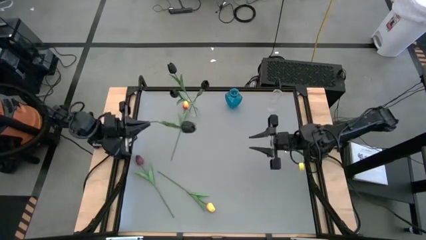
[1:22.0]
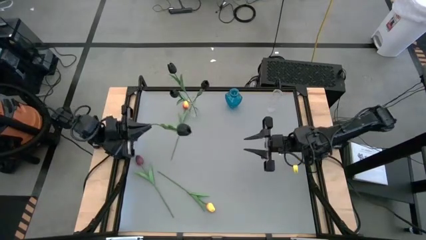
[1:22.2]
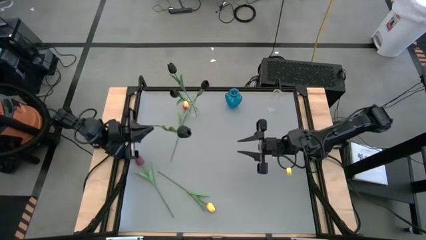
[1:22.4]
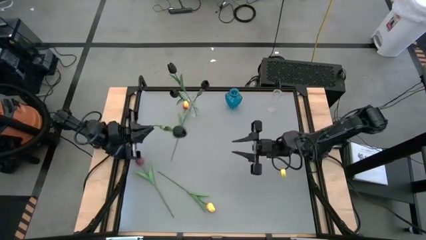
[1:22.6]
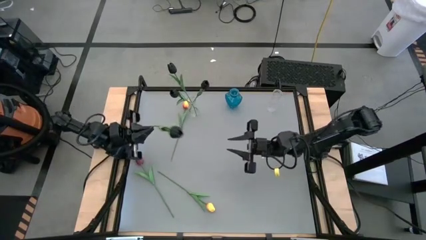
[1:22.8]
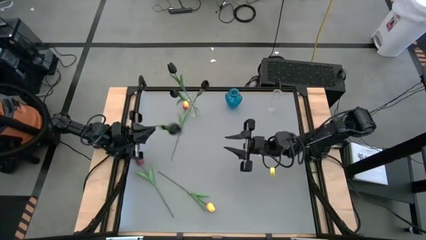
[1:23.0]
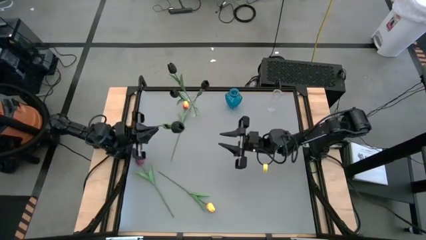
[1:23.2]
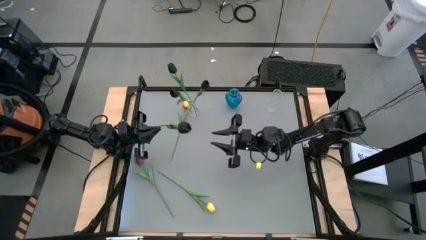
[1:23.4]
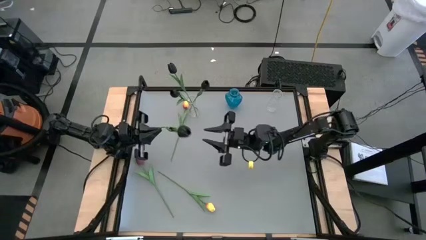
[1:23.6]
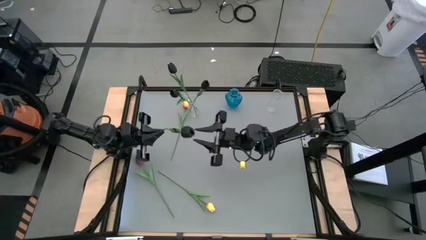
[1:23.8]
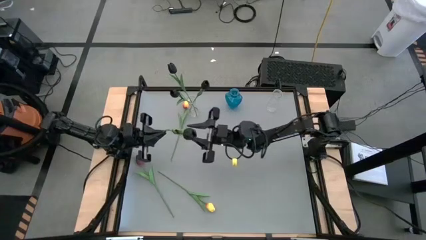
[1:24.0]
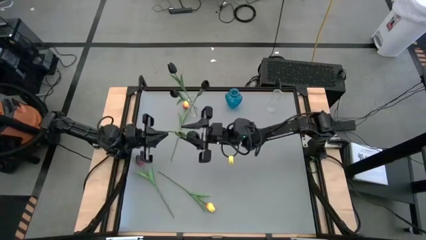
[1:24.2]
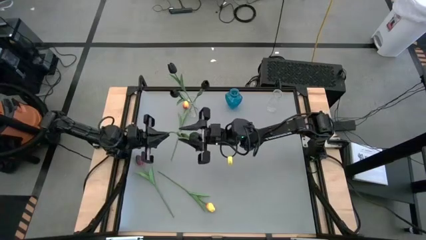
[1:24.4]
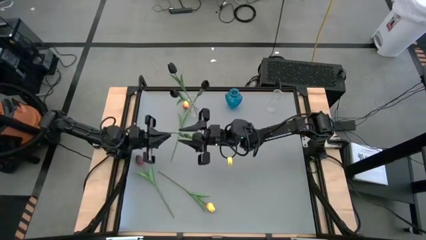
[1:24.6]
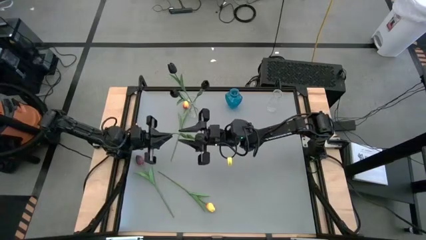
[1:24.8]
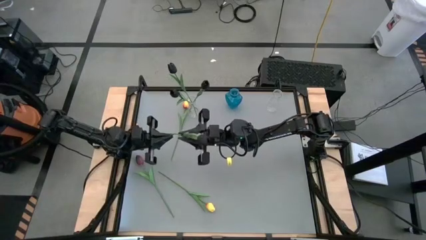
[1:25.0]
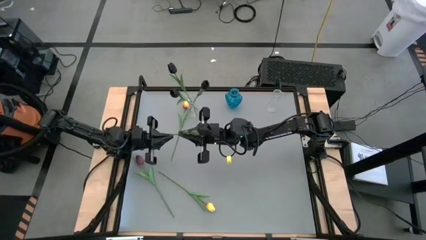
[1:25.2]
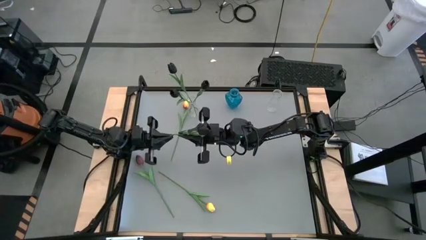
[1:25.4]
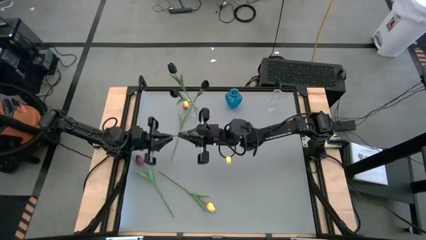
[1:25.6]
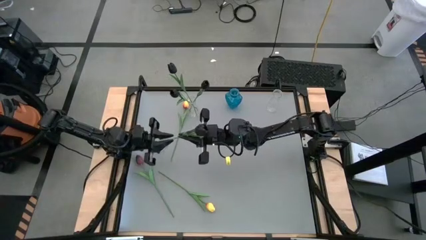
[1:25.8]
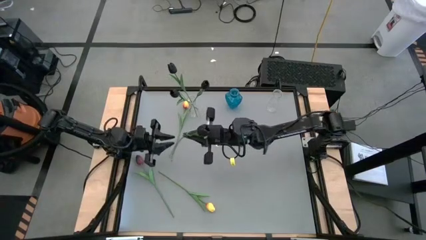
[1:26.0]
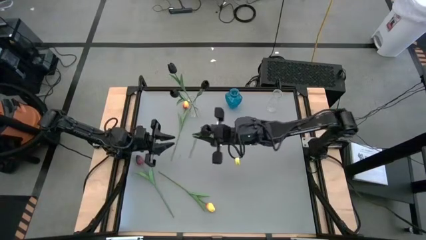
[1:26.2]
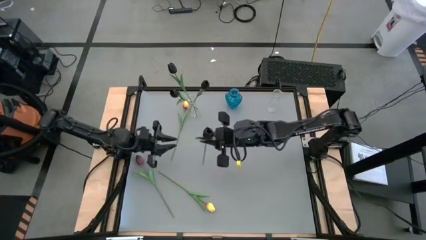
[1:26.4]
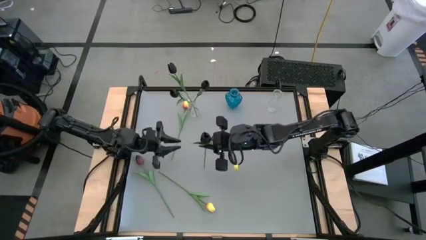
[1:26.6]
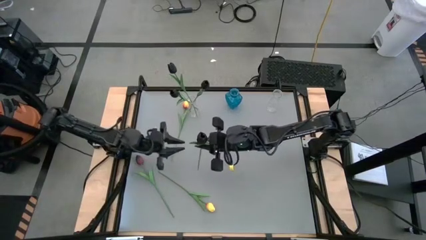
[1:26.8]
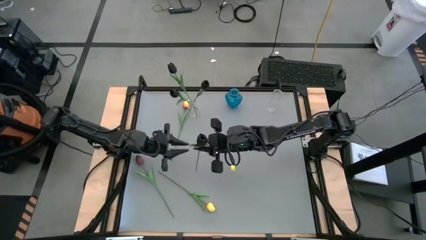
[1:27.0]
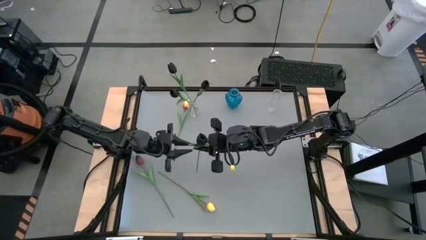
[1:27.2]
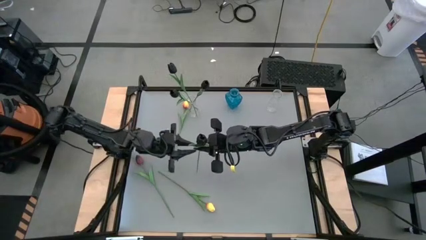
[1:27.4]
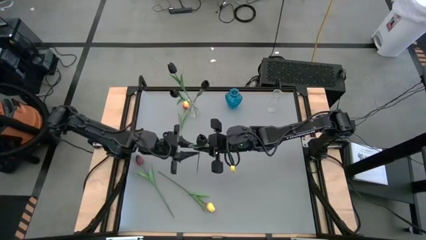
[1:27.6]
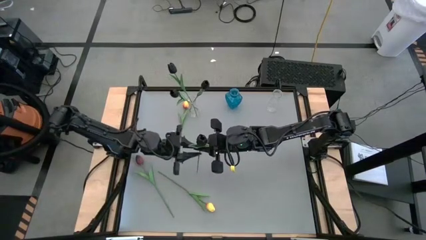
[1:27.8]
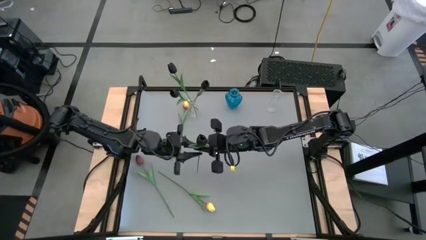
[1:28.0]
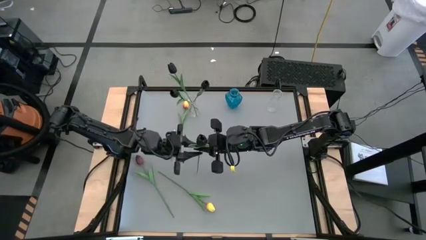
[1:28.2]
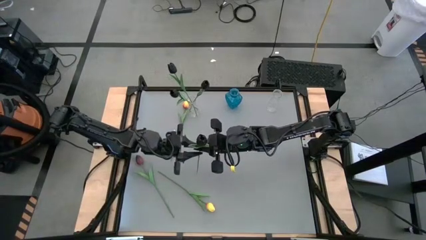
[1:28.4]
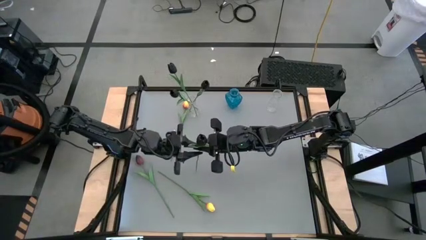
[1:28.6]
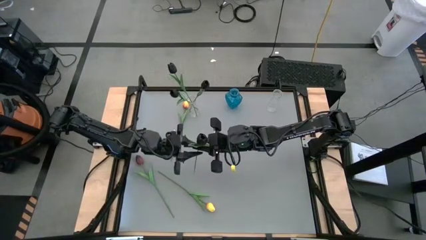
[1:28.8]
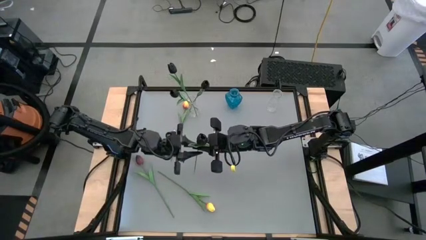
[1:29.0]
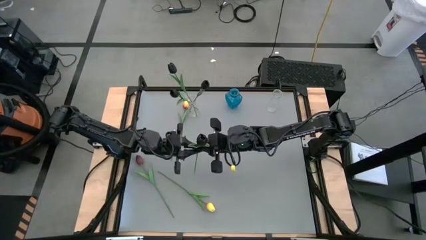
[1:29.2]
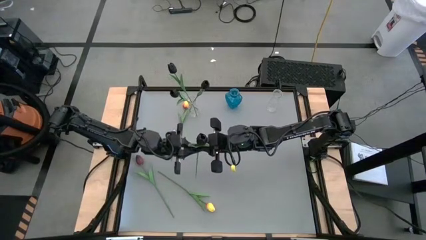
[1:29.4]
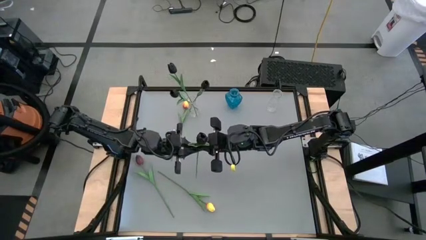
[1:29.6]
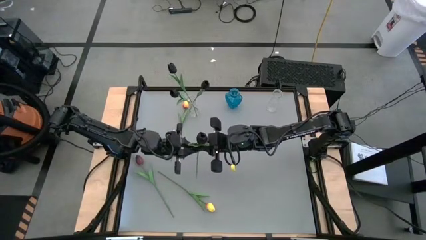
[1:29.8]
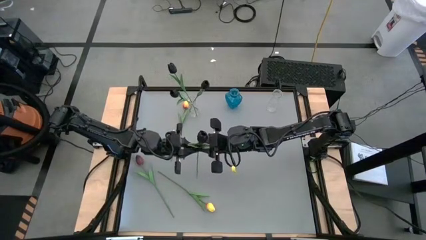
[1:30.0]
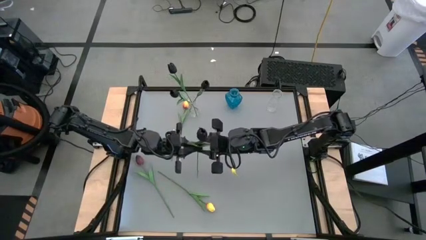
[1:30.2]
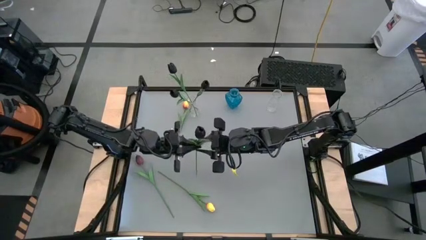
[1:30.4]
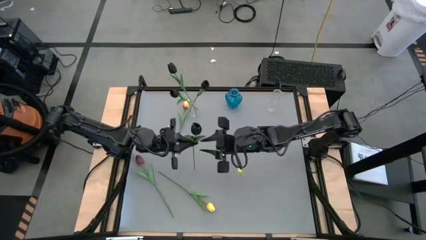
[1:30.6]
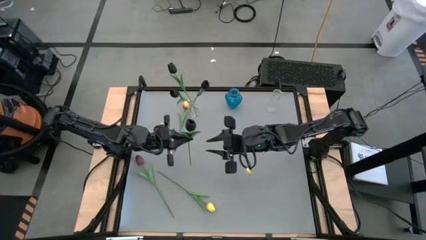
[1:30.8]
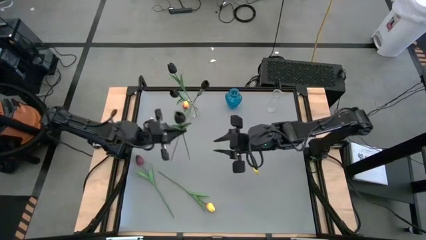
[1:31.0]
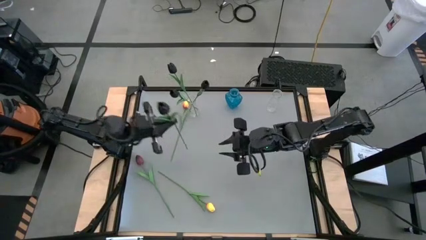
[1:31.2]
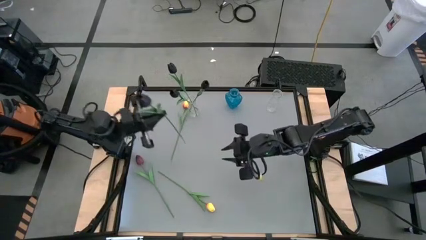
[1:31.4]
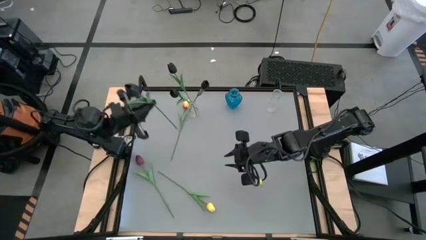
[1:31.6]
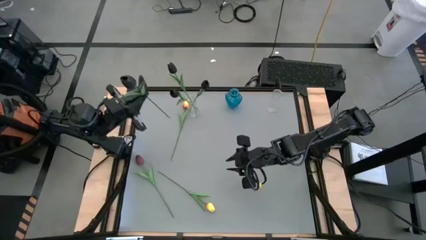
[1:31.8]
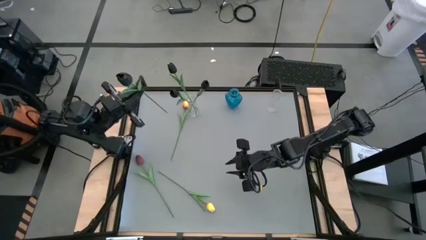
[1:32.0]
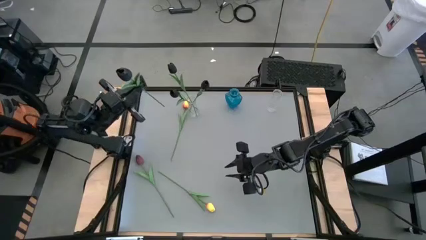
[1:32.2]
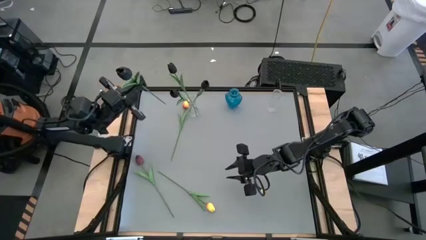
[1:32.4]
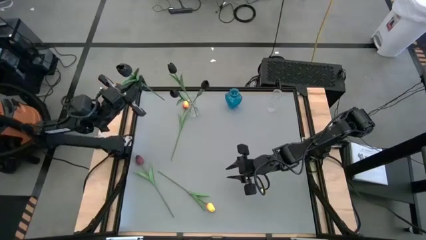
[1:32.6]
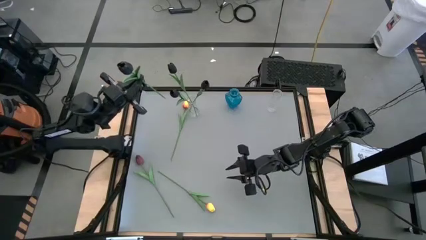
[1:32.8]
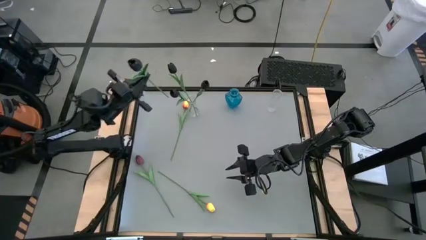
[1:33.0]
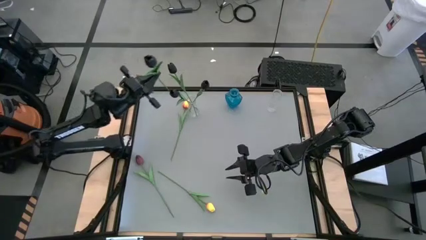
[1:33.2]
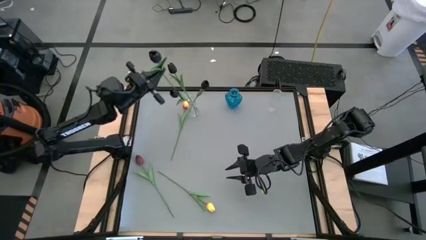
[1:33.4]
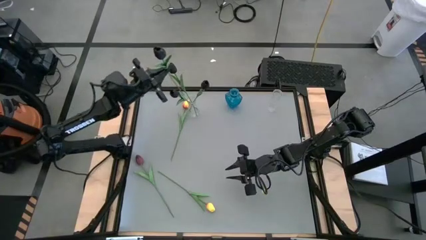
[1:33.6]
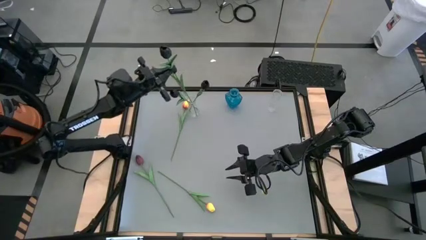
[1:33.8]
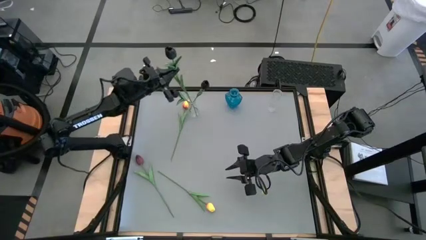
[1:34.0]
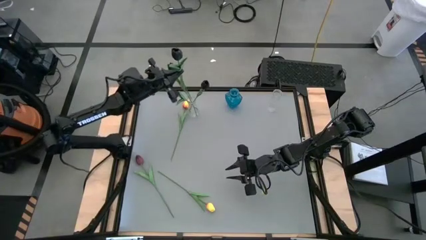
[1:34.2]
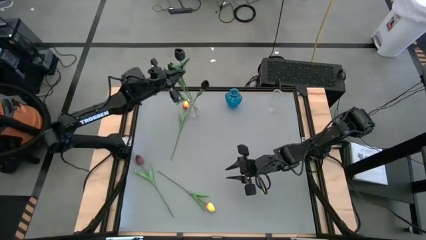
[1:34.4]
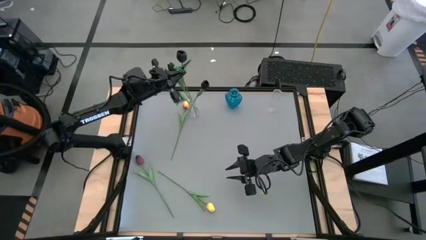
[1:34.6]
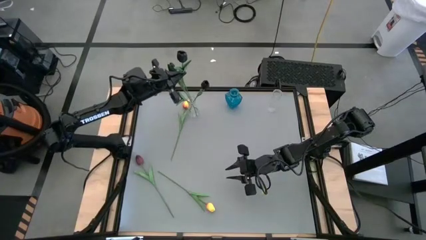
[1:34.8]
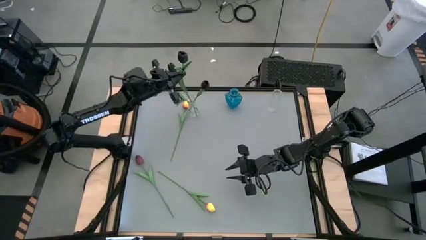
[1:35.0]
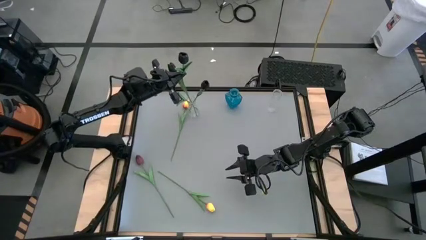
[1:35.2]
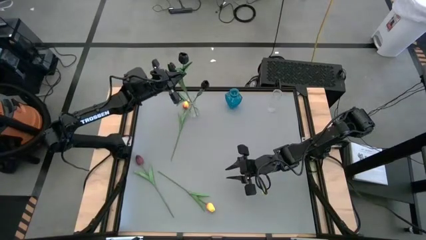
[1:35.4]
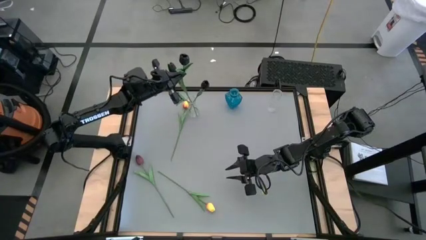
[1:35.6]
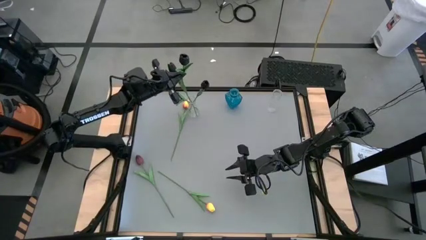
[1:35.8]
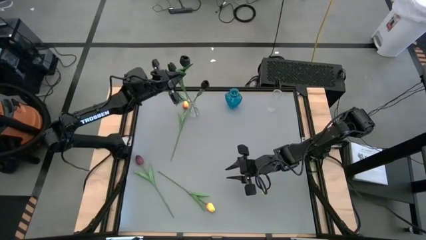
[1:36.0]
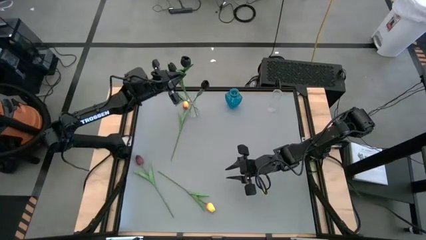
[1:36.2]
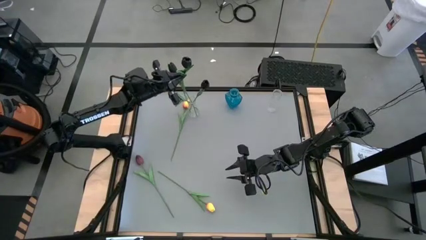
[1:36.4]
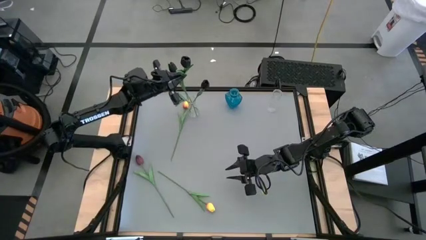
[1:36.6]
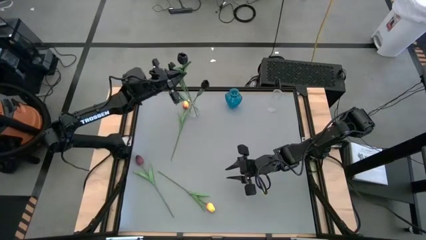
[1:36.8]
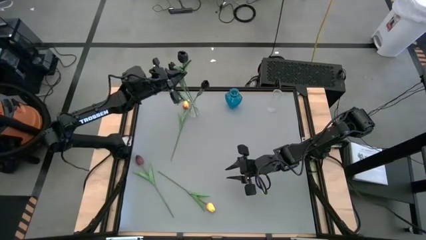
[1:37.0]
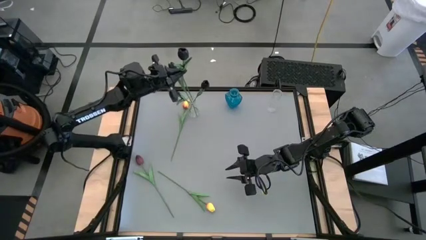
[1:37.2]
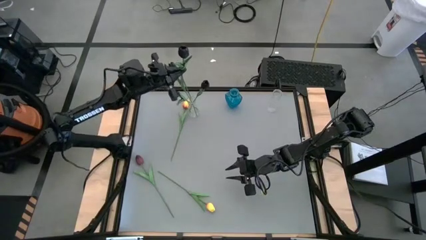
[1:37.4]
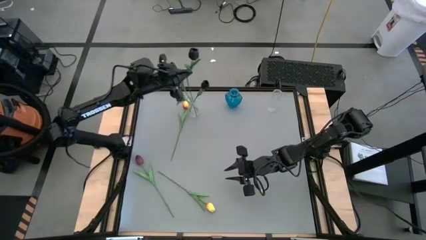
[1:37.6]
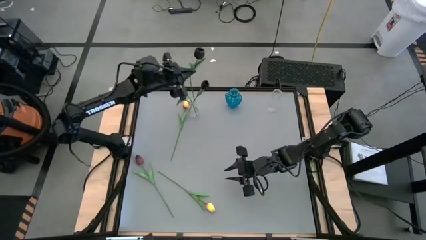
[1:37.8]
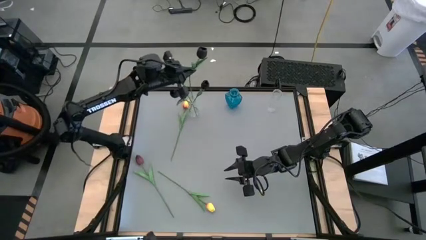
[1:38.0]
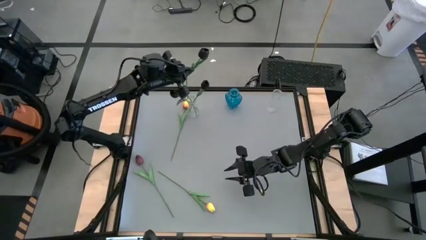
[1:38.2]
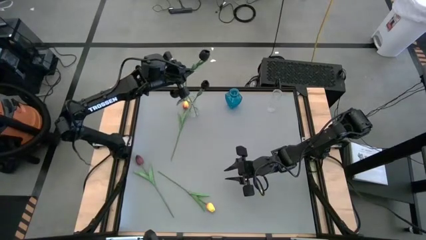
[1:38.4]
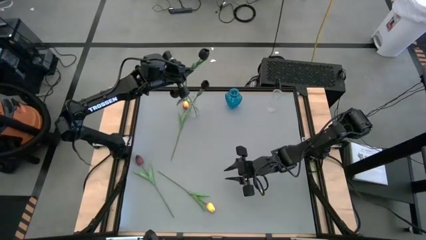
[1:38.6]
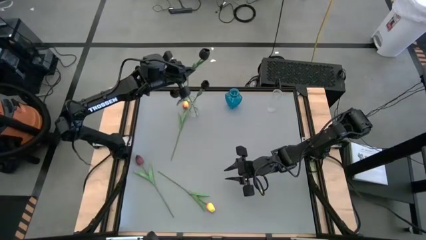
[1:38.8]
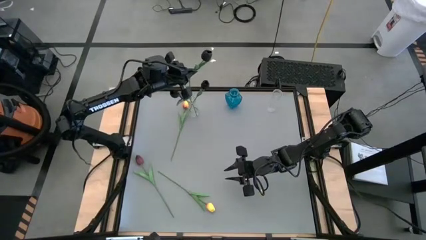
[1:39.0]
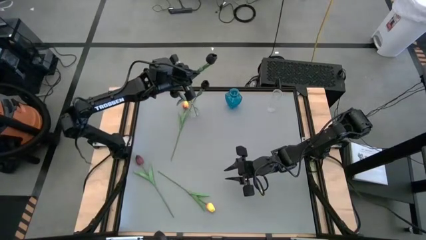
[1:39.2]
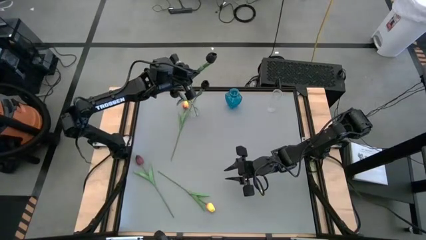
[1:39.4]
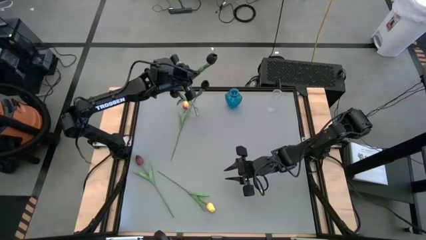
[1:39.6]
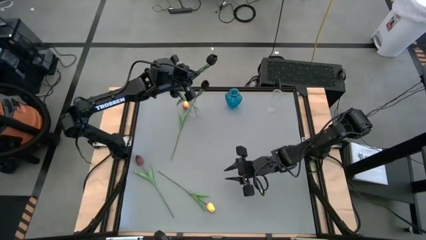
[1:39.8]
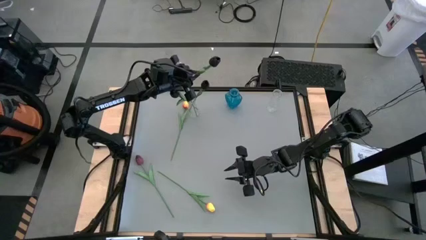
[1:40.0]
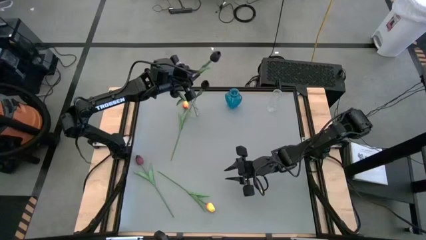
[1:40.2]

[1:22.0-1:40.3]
Task: Sort flowers into vase by color
Put the black flower into the left transparent flower vase
